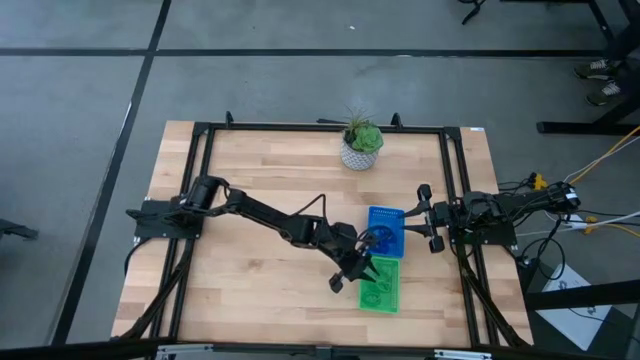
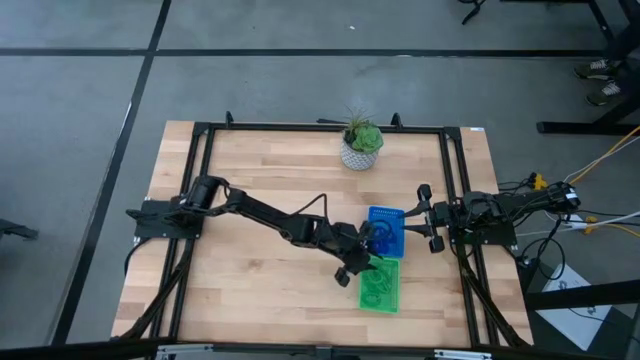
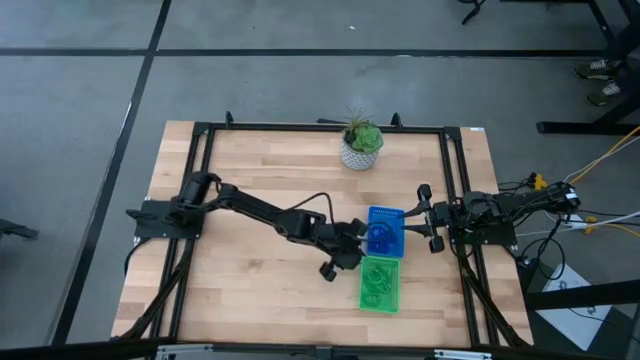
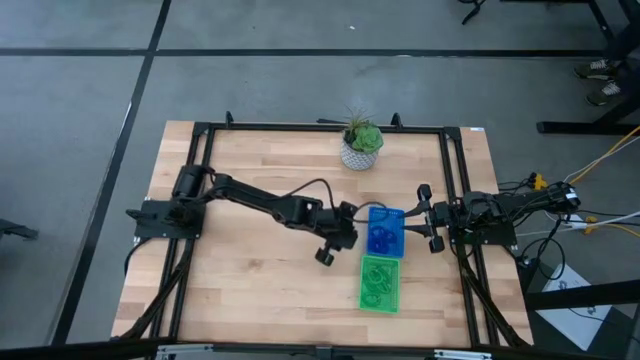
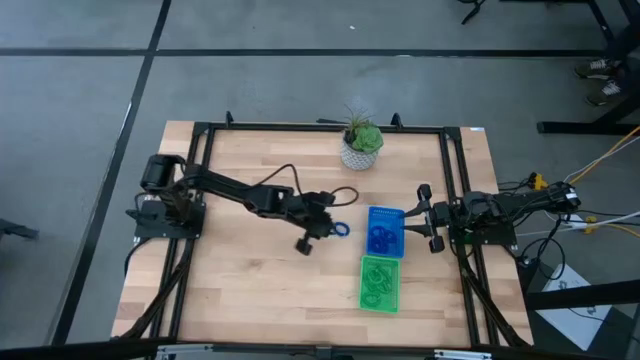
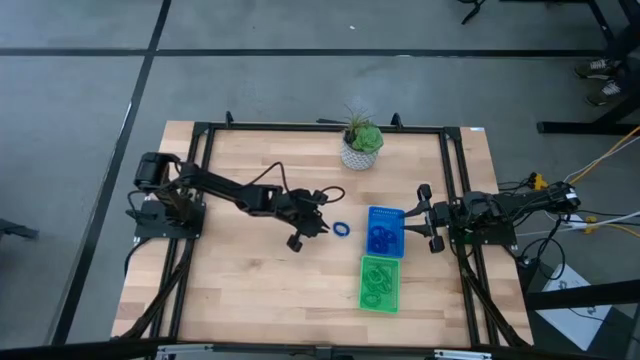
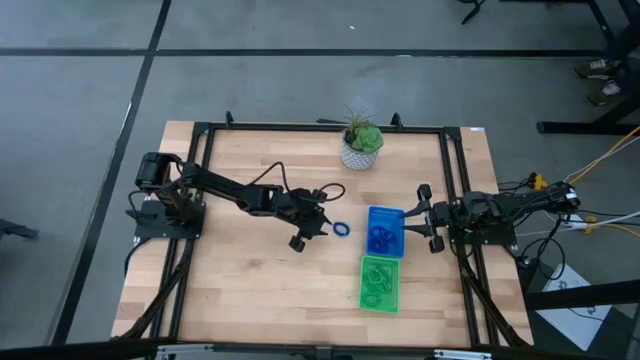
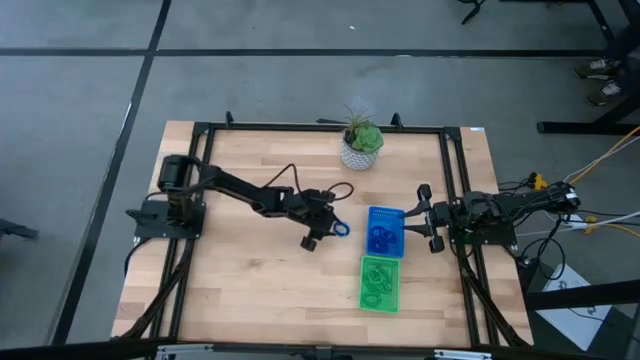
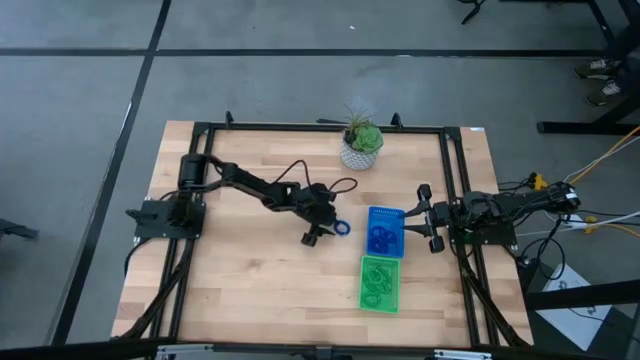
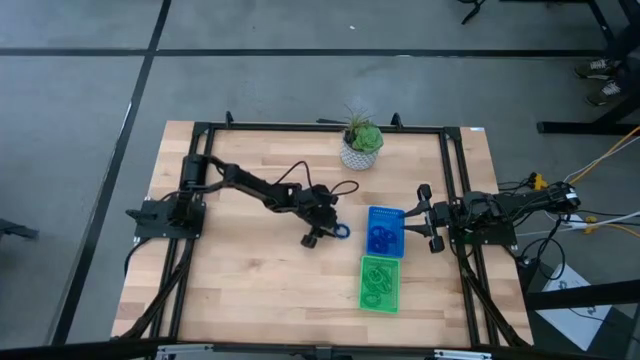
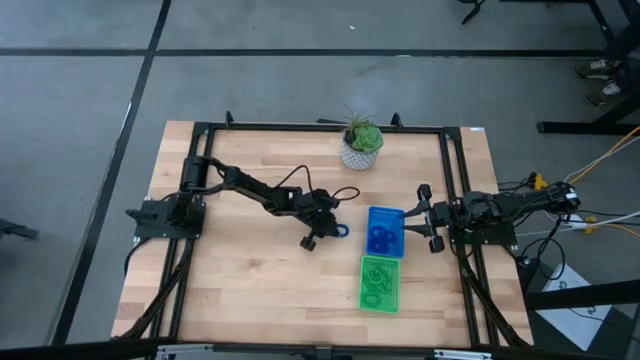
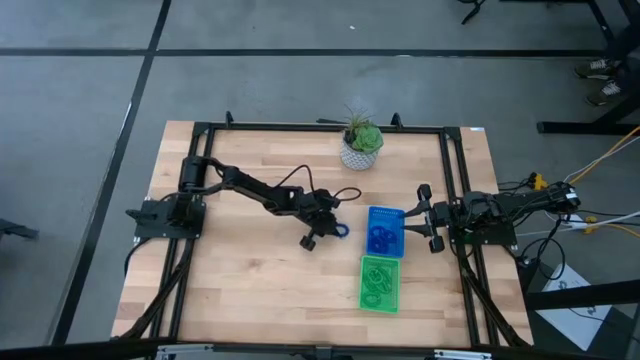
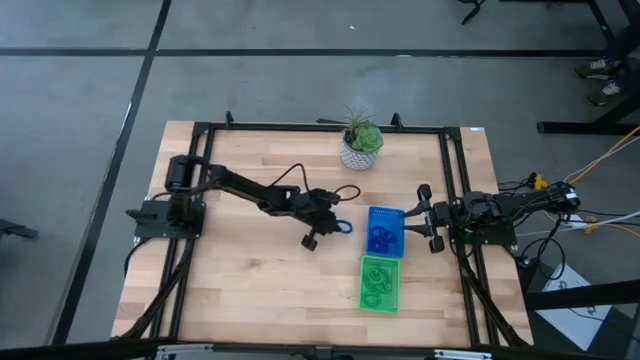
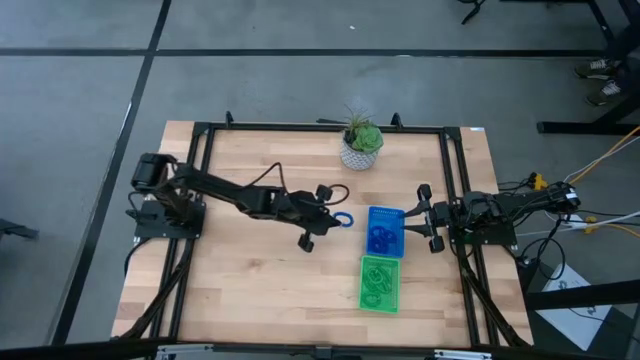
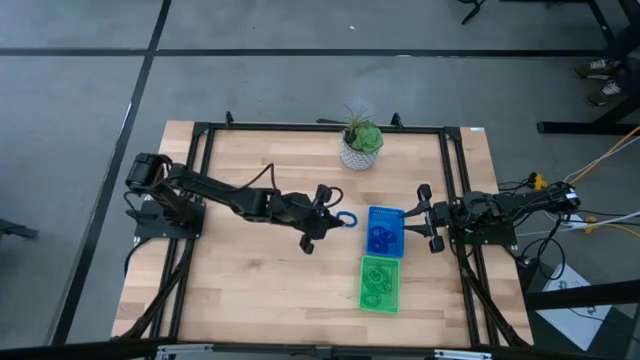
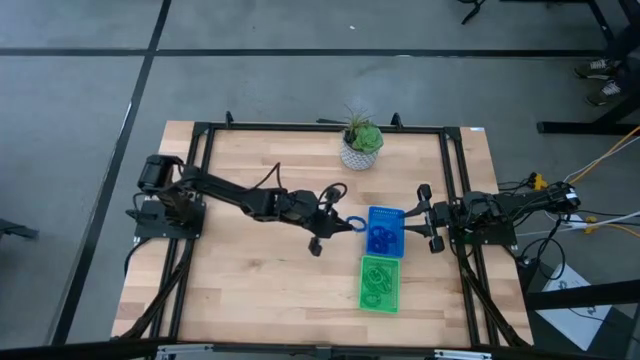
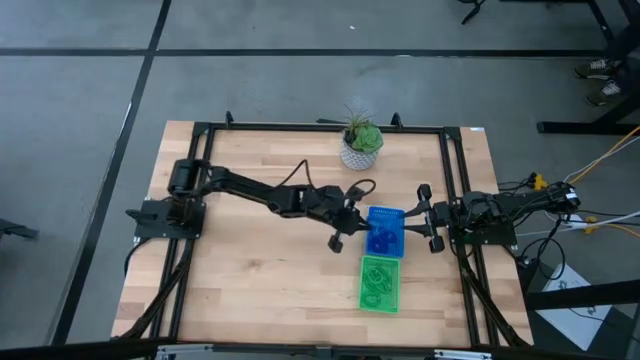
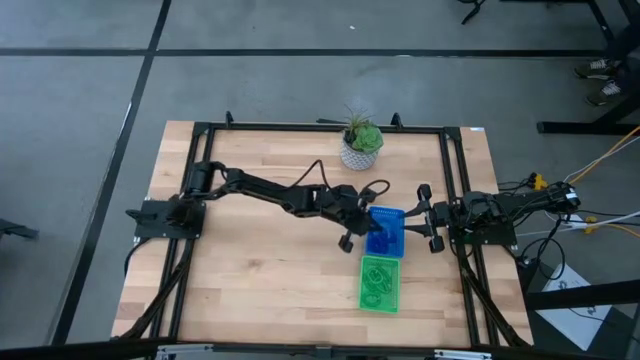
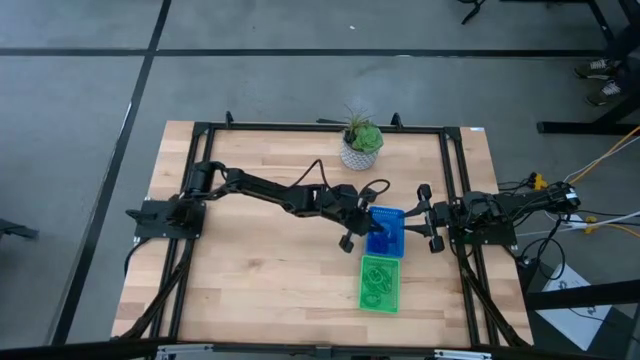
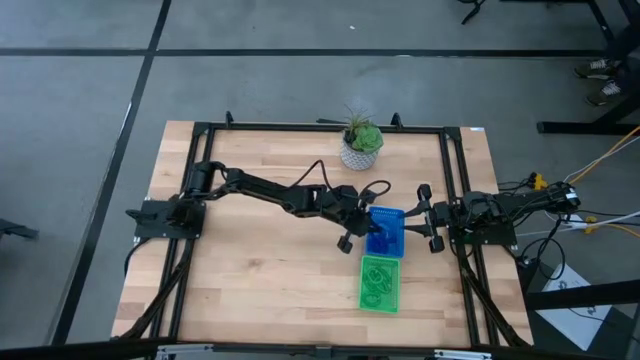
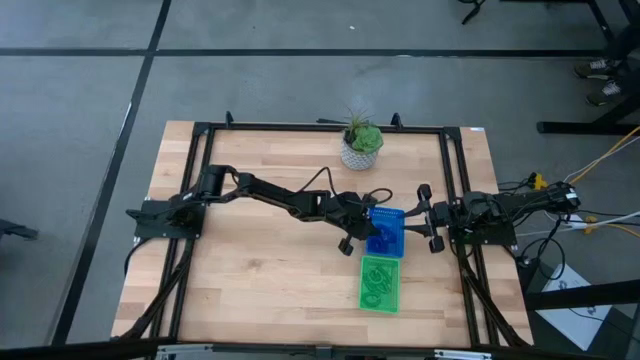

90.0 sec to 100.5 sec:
Task: Sort spring keychains
Put the blue spring keychain into the blue bin

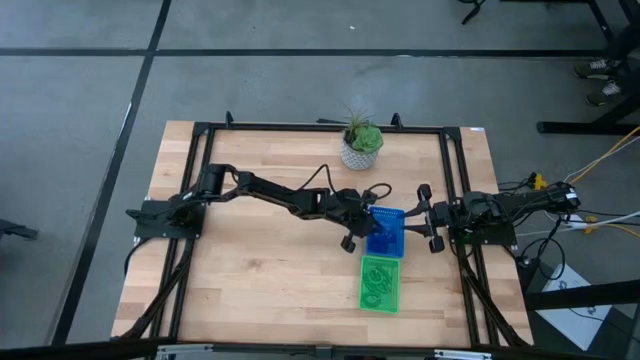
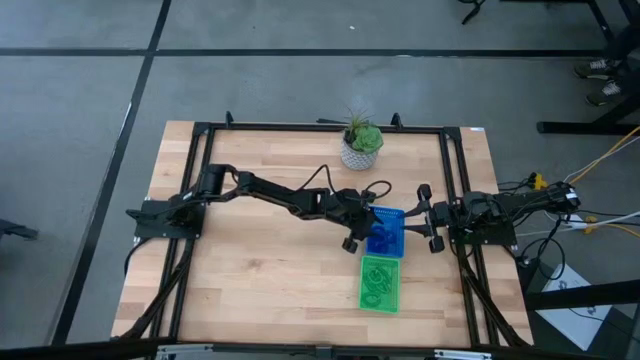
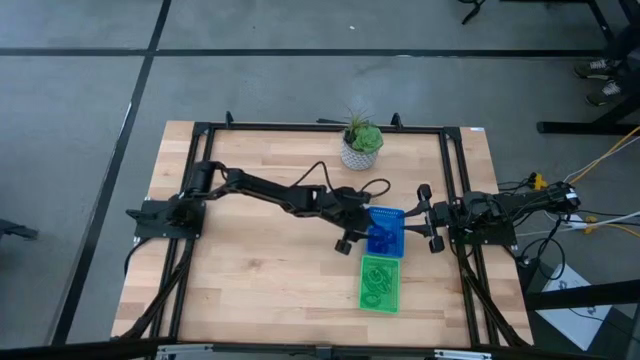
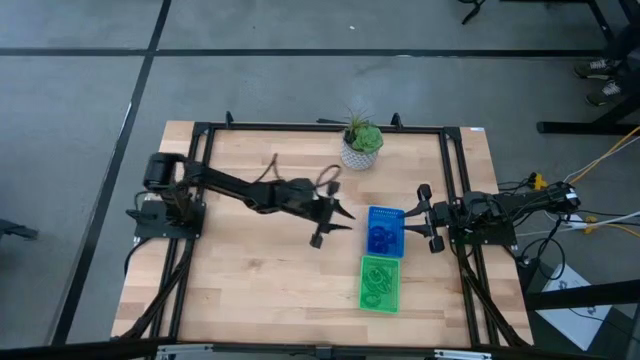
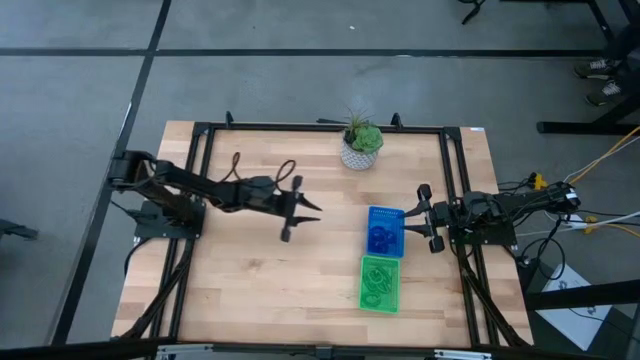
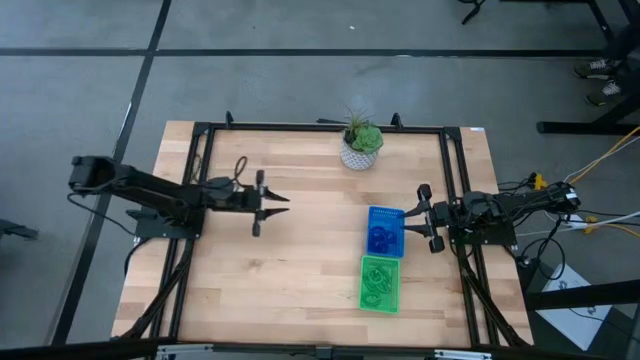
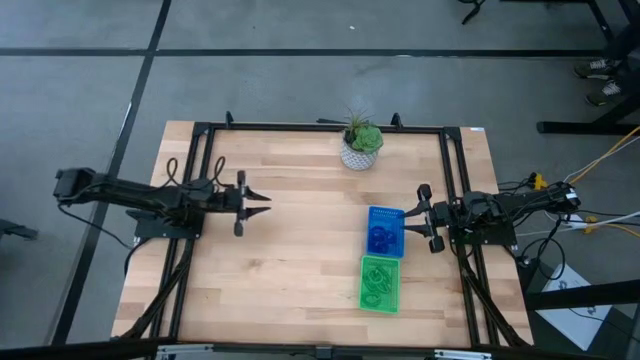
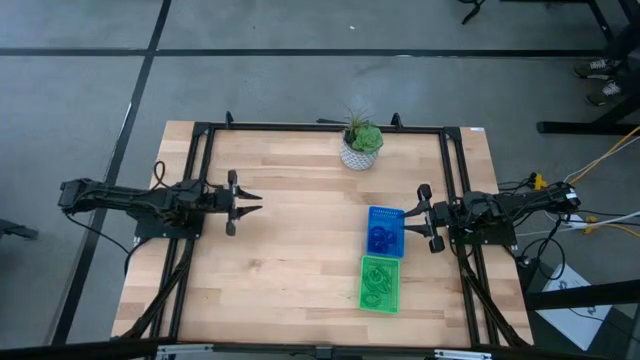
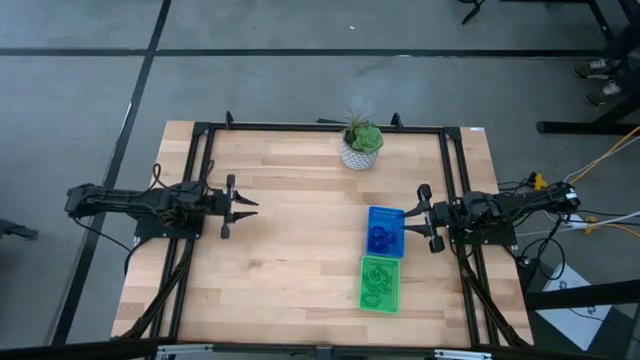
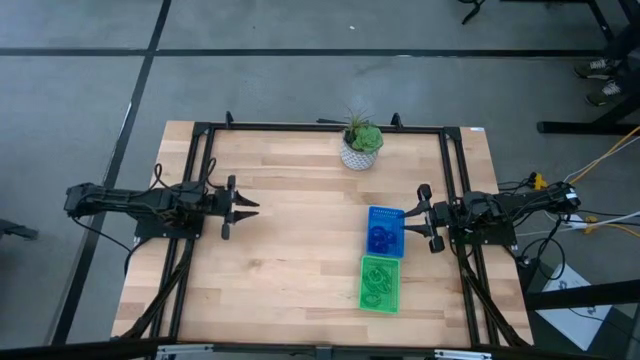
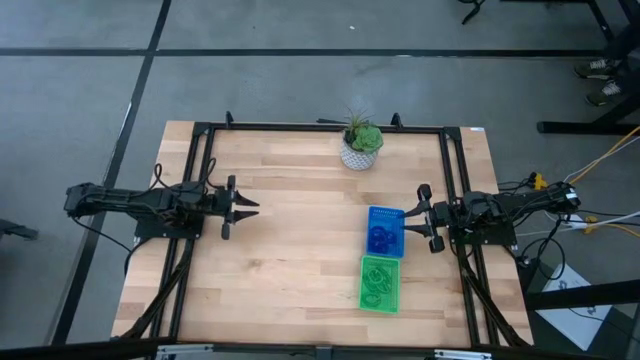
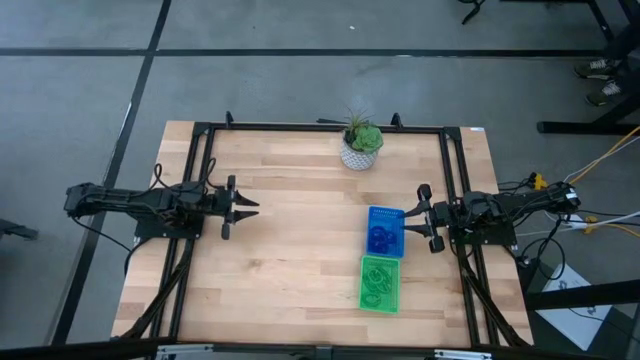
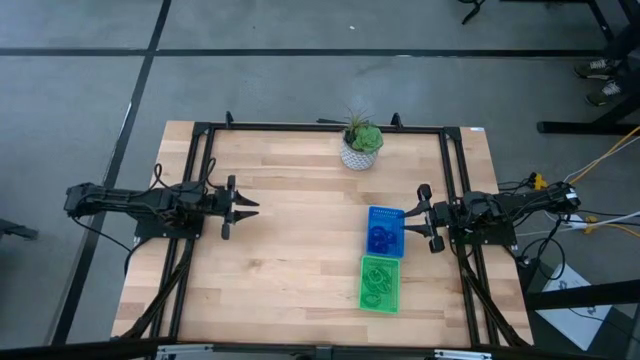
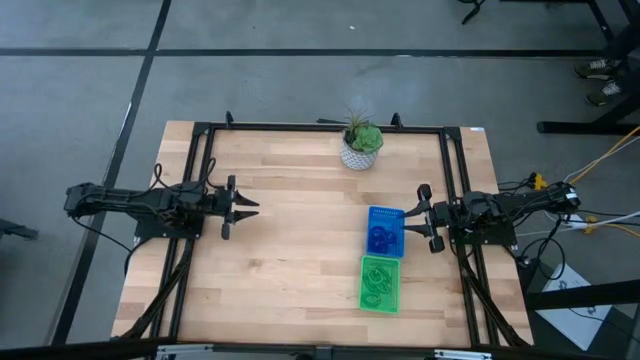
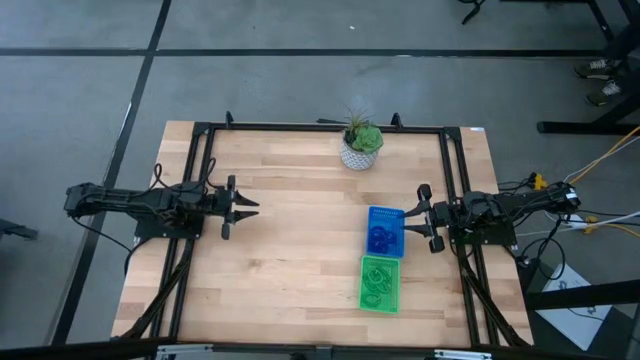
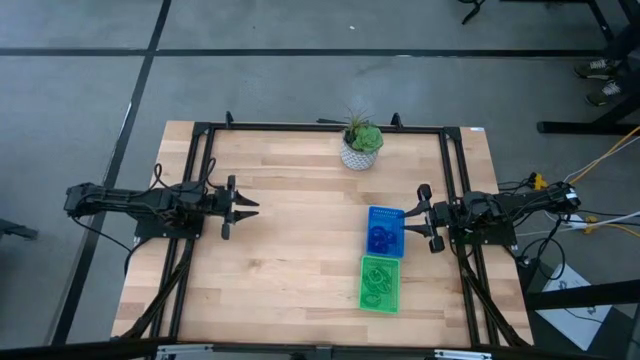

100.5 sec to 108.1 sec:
Return to Home Position

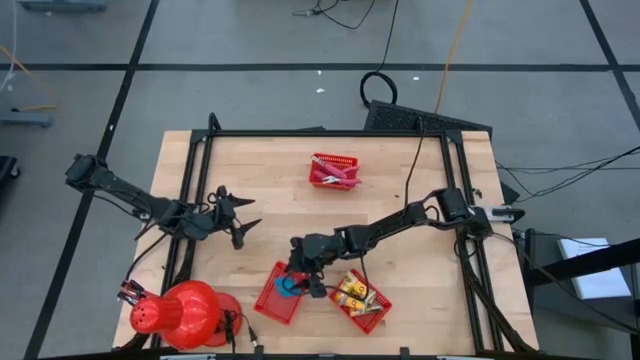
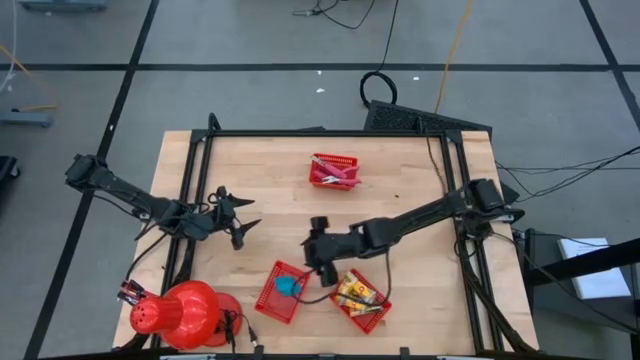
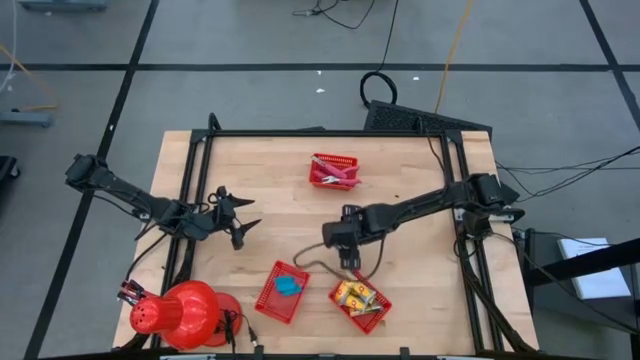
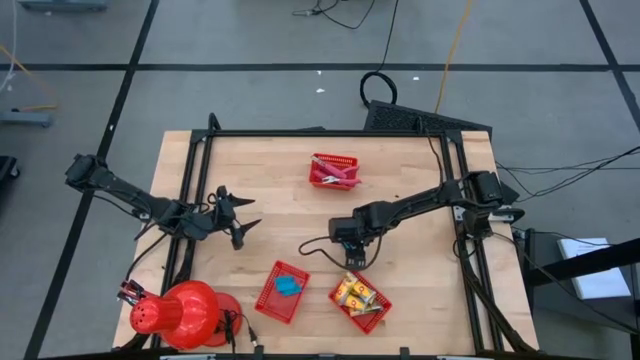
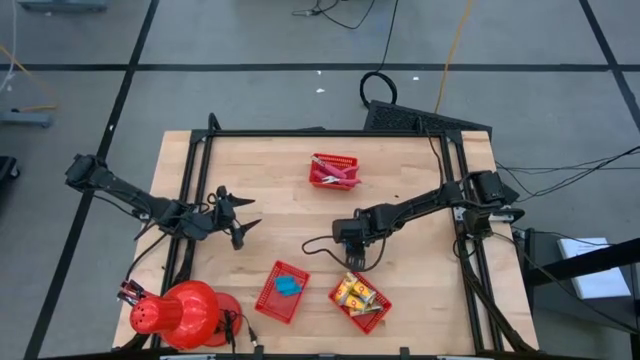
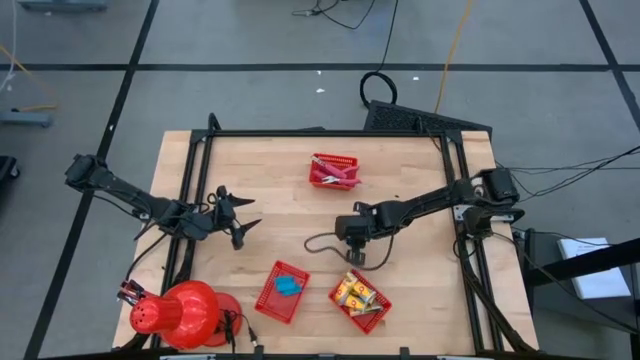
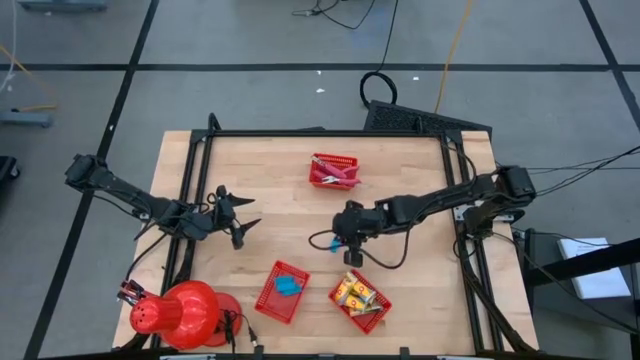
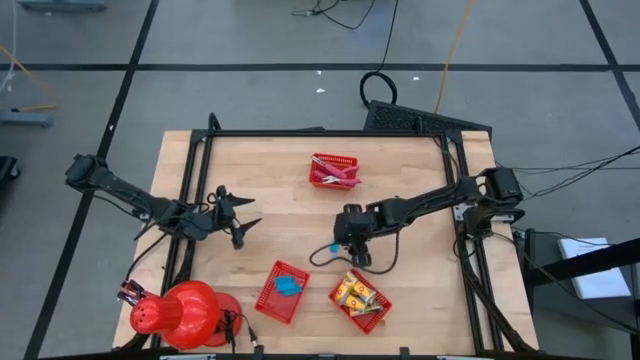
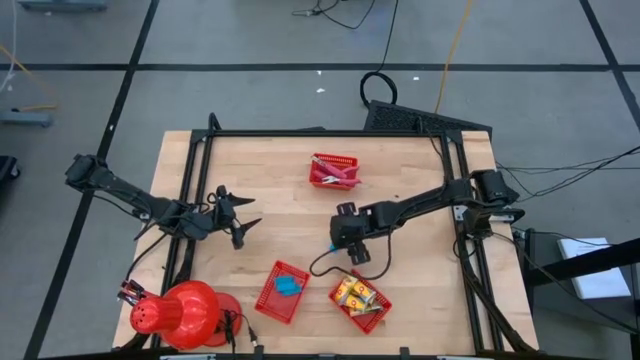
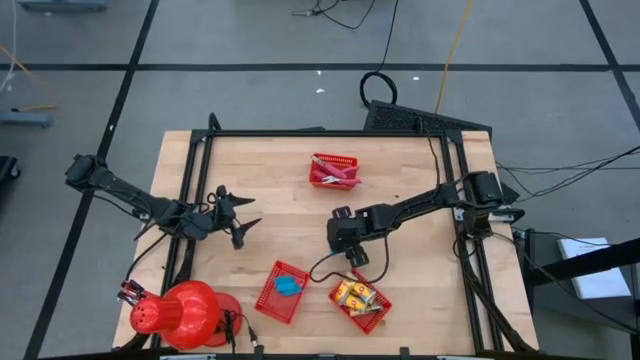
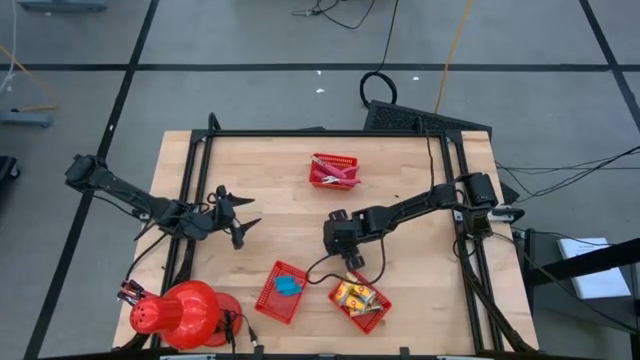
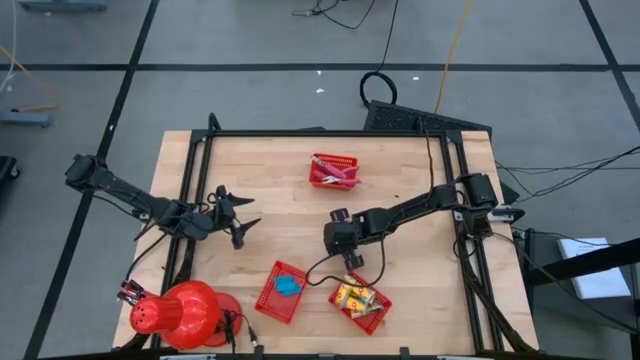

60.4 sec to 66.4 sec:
Task: Pick & Place School Supplies
Put the blue eraser into the bottom left red basket
